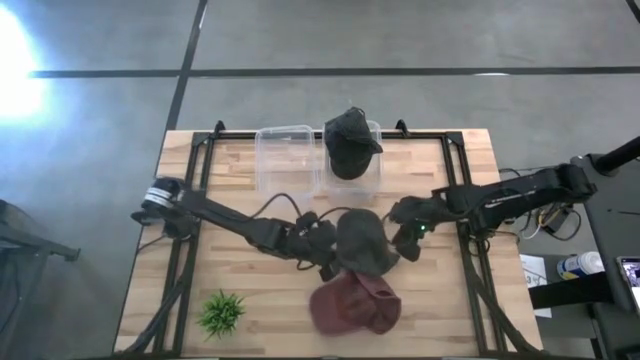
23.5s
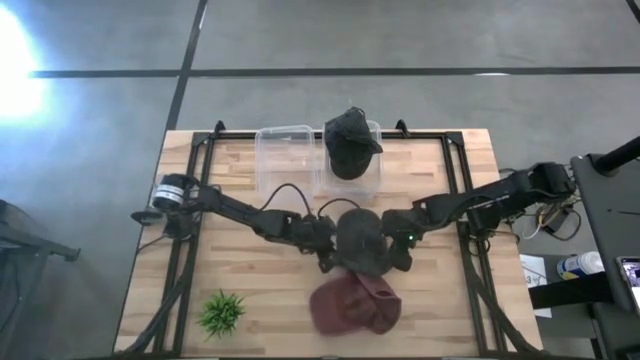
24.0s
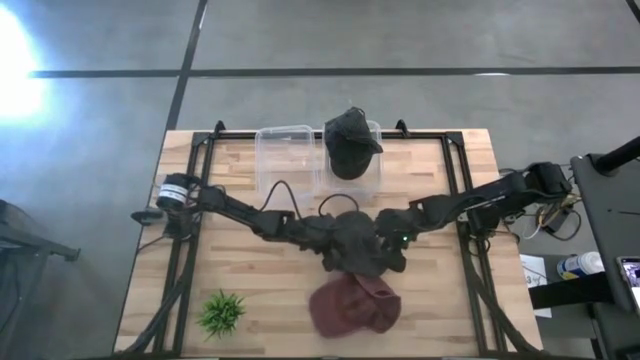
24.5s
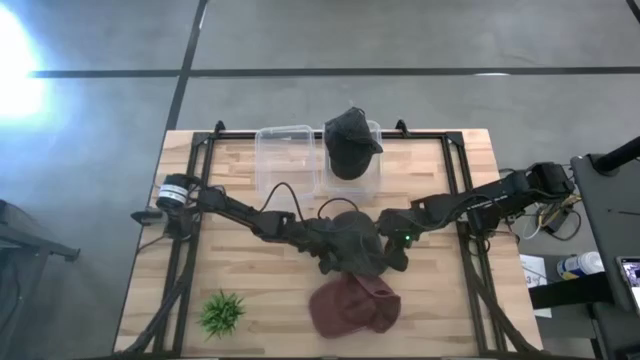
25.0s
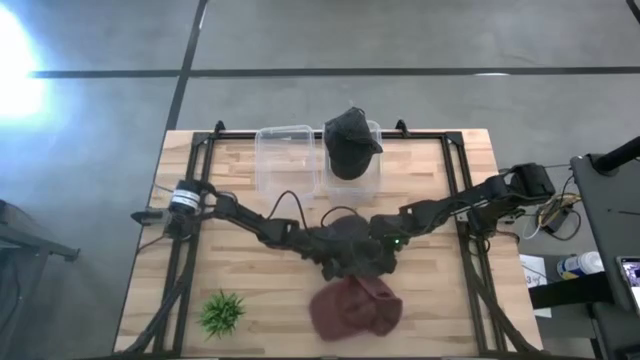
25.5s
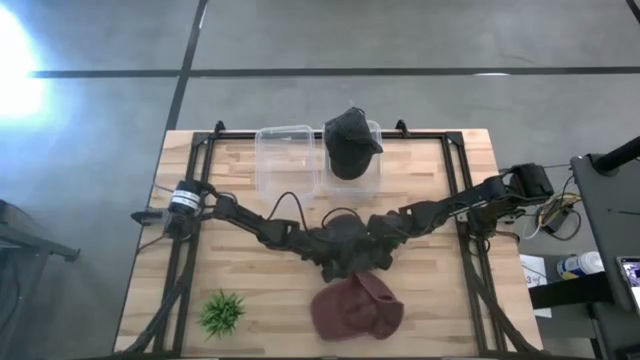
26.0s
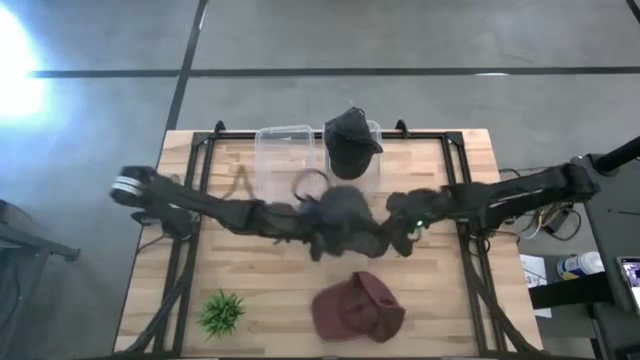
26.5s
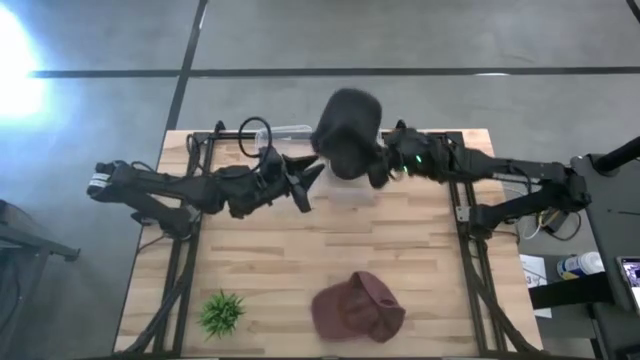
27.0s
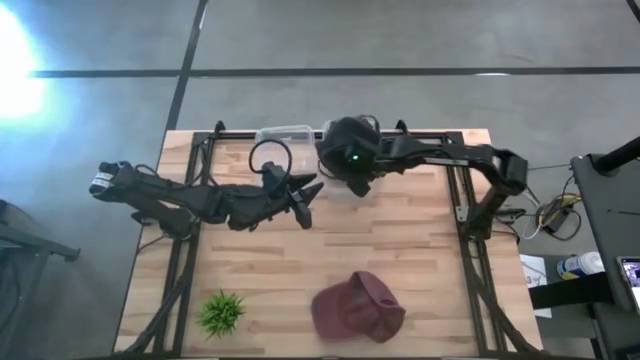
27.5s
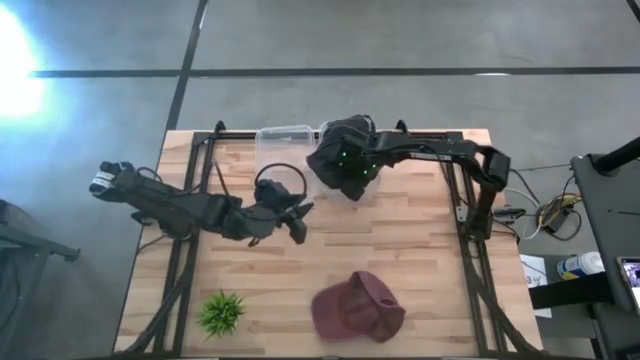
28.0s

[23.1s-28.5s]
Task: Pick & Place hat
Put the black cap into the right transparent bin

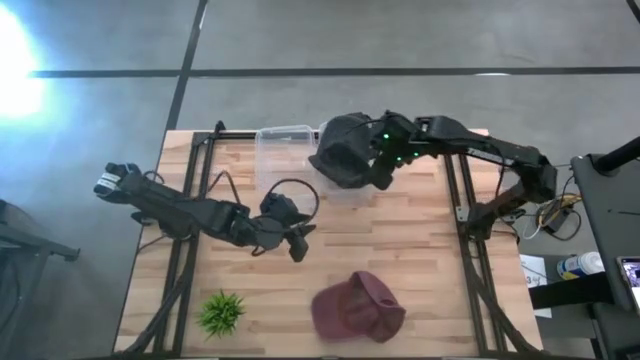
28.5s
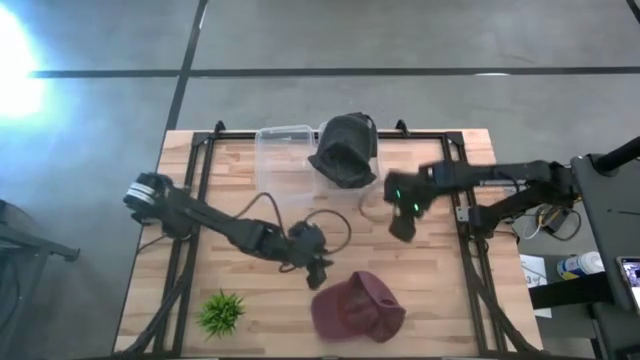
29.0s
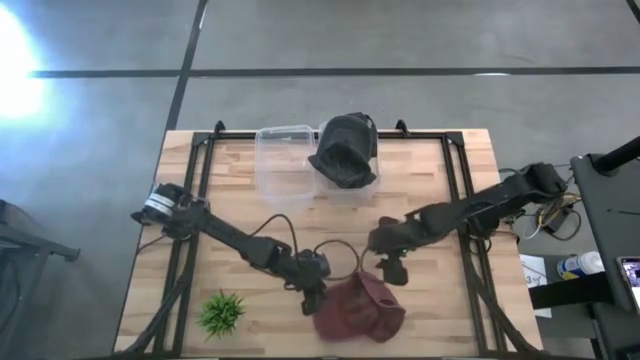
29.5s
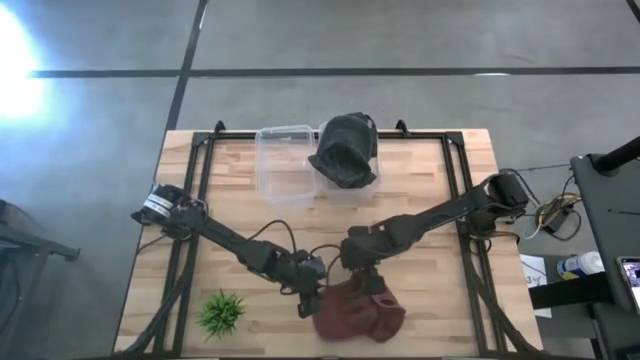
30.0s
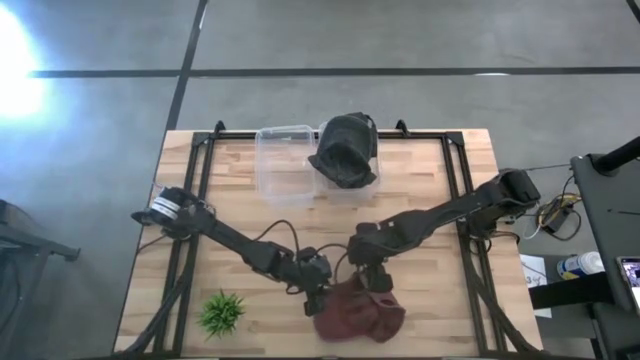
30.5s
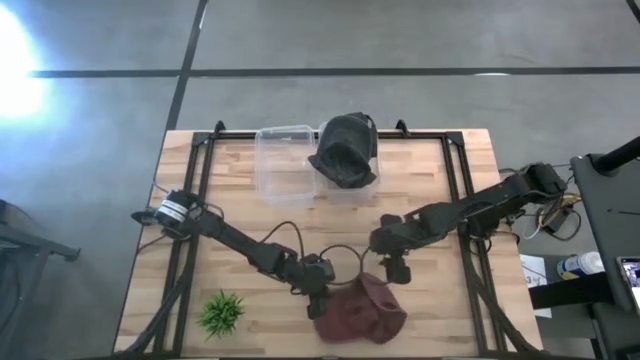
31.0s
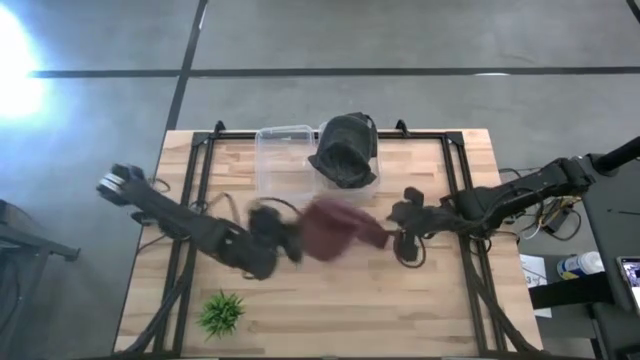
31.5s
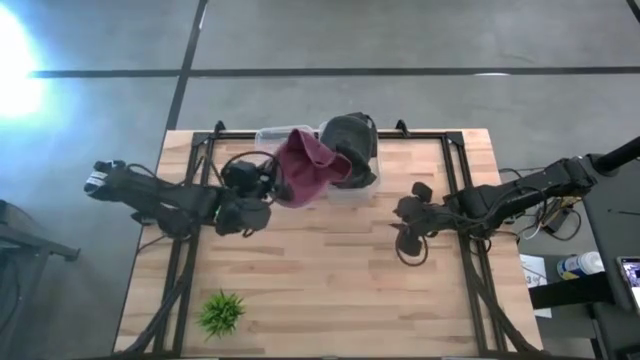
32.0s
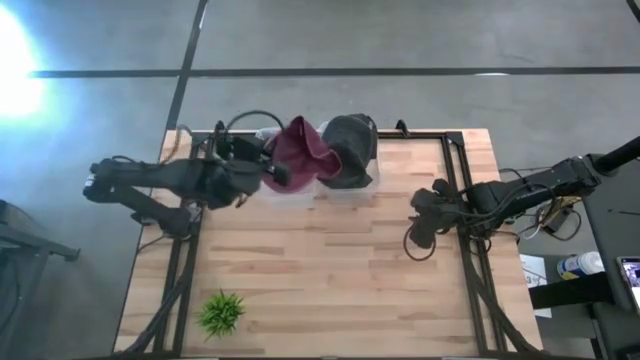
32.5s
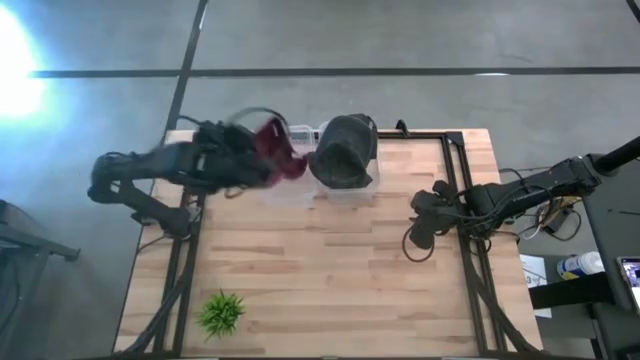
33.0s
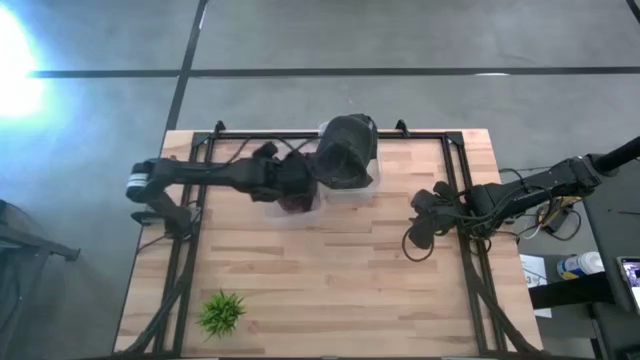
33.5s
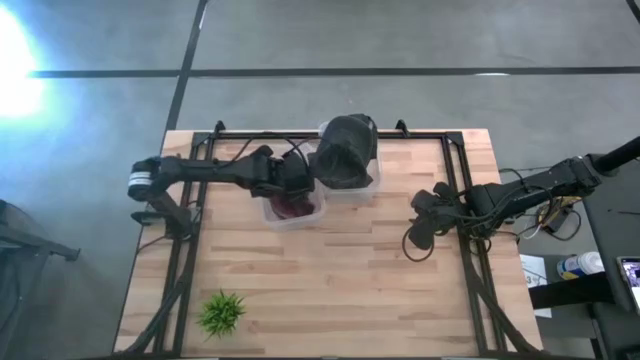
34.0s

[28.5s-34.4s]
Put the red cap into the left transparent bin

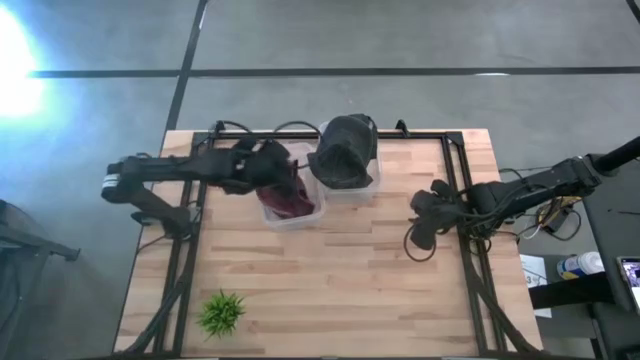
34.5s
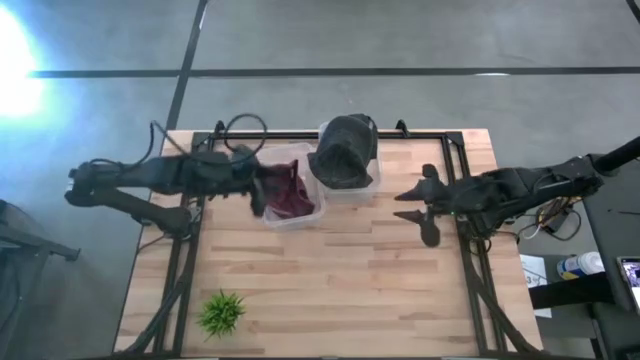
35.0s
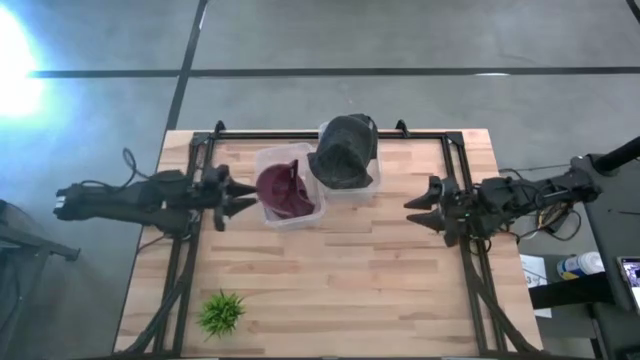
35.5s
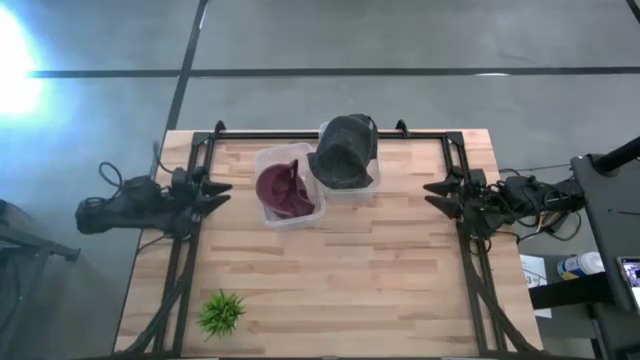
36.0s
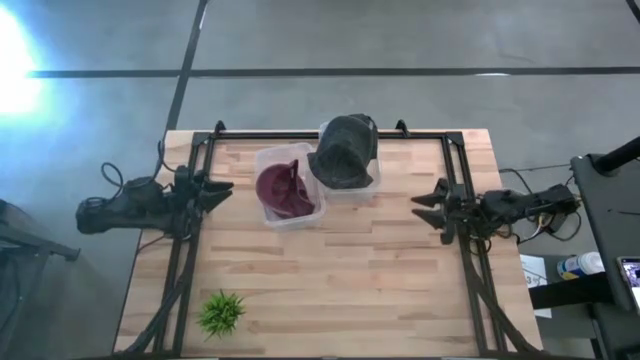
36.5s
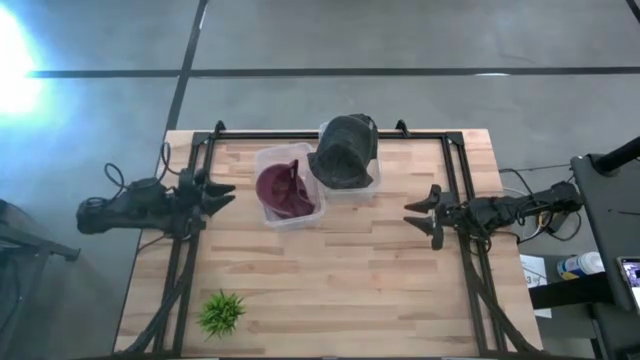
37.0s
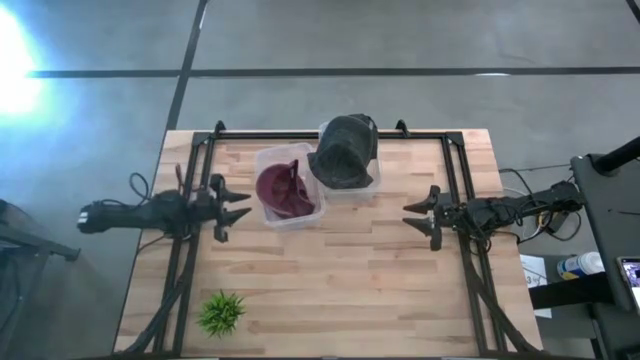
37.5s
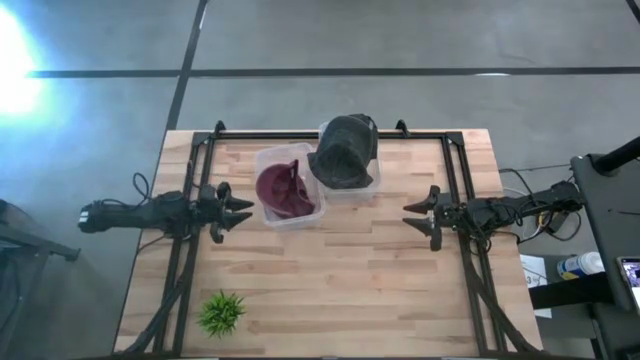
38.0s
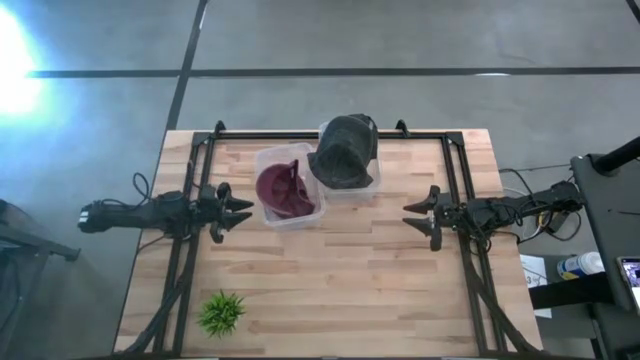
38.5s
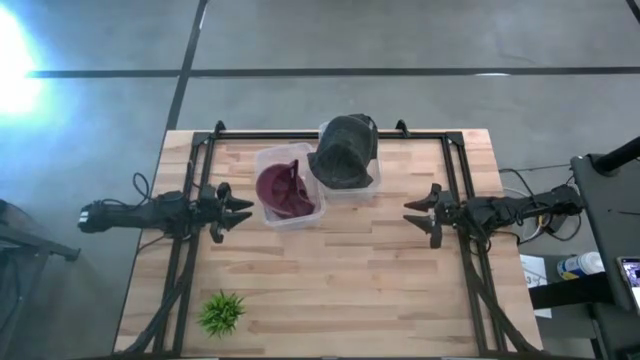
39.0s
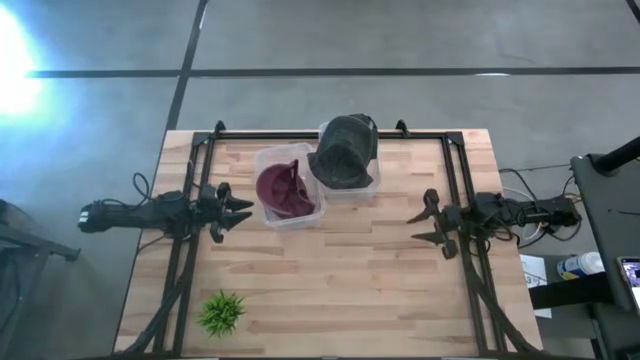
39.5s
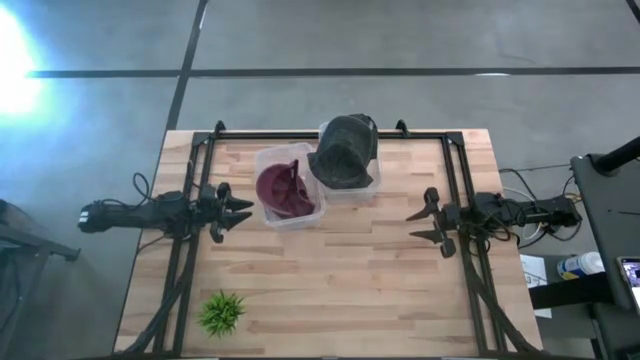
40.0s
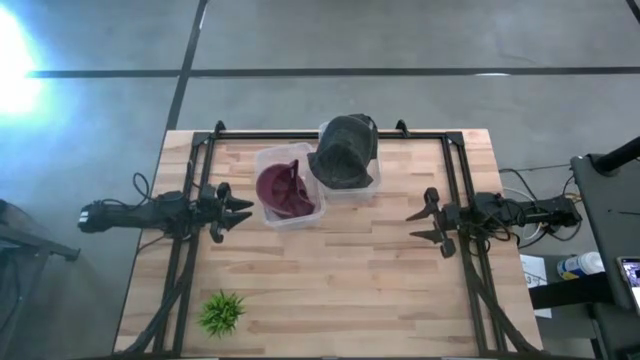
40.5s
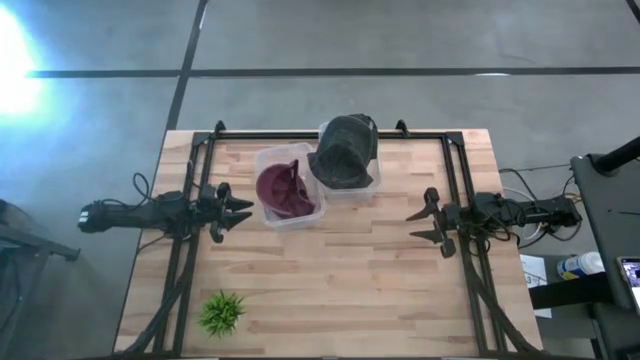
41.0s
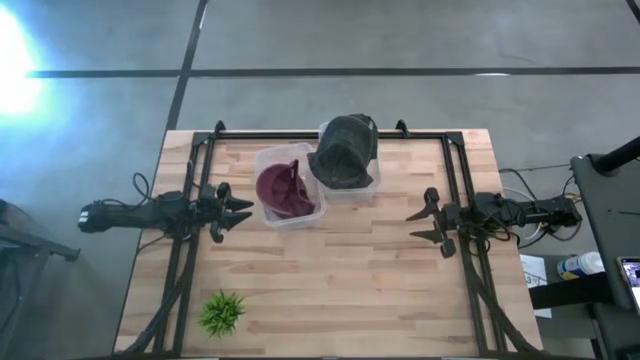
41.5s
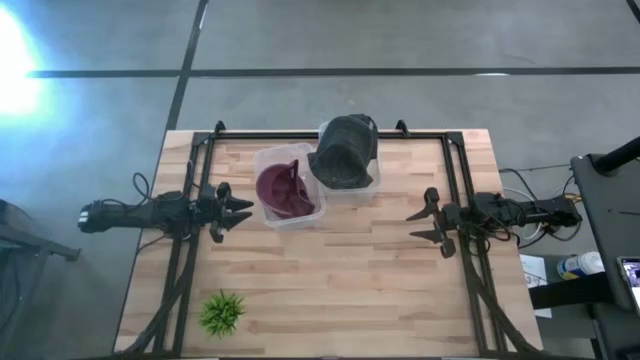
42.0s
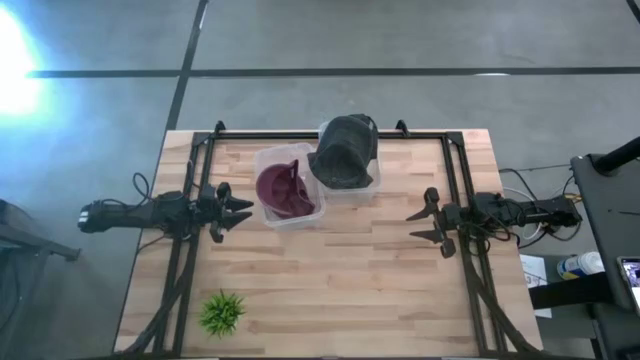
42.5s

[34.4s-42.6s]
Return to Home Position

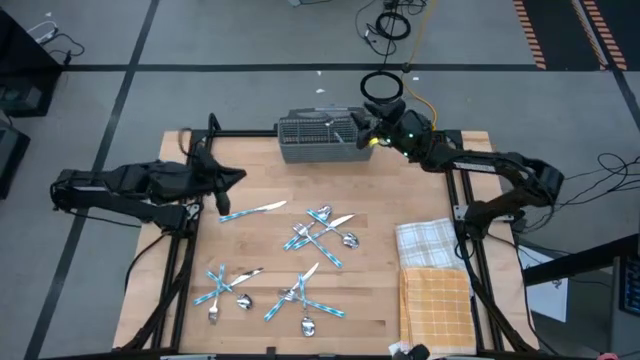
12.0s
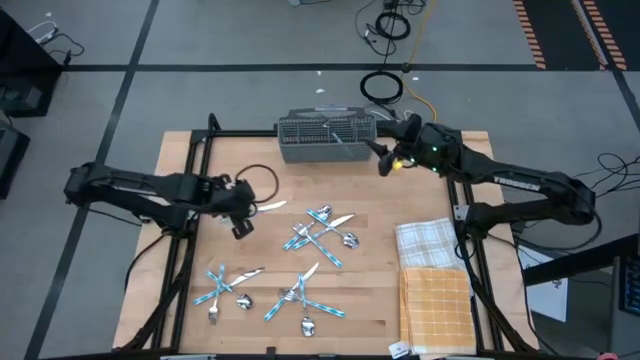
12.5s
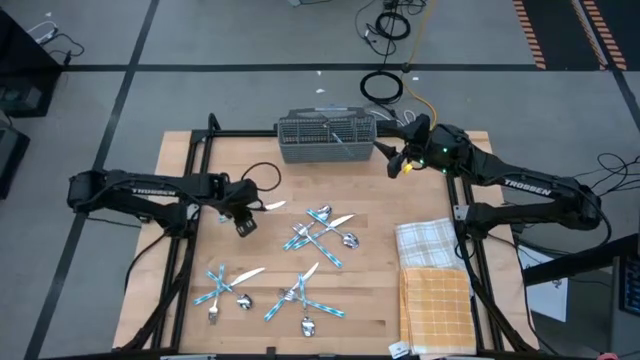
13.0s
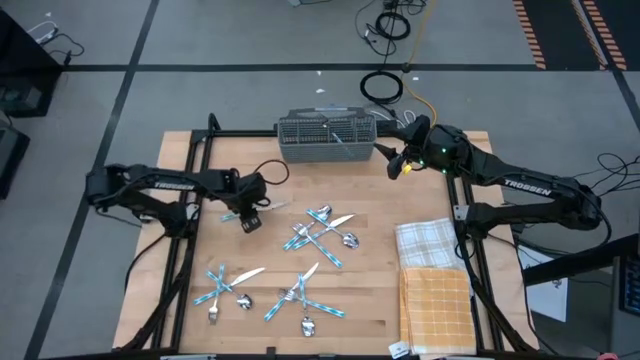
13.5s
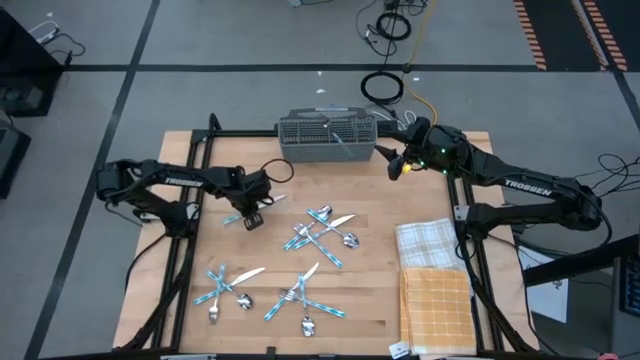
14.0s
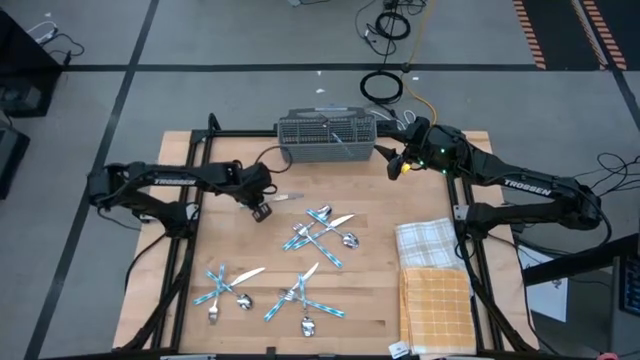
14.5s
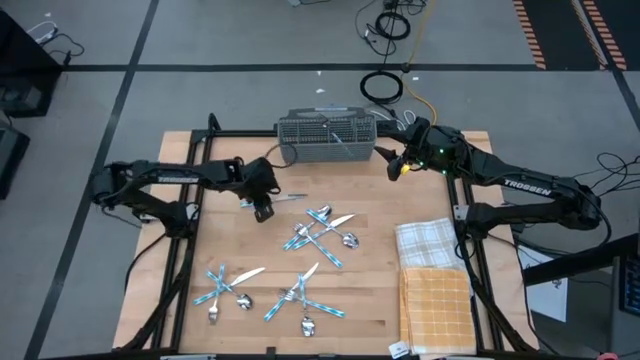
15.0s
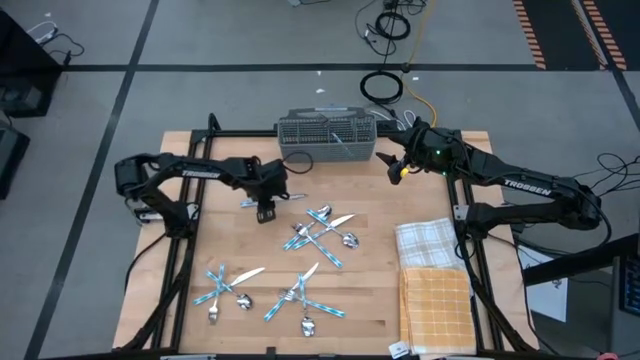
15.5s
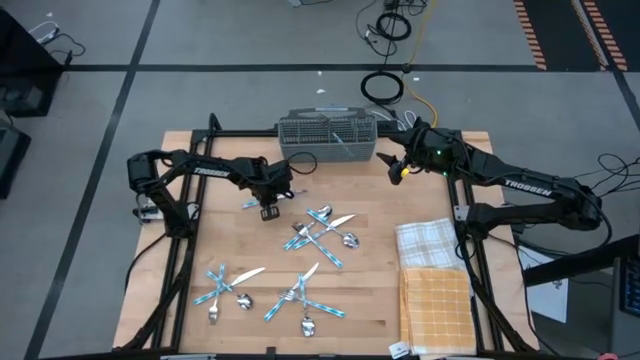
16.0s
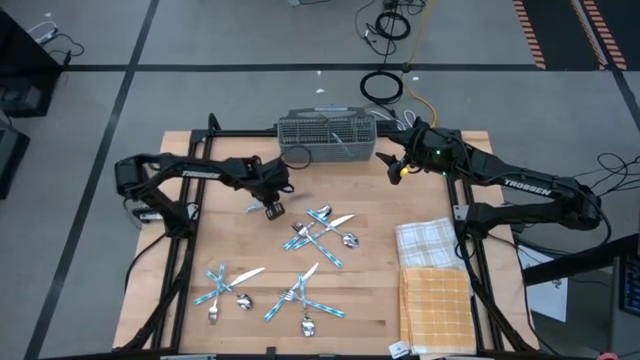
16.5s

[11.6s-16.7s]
Task: Sort silverware
Put the table knife into the silverware rack
